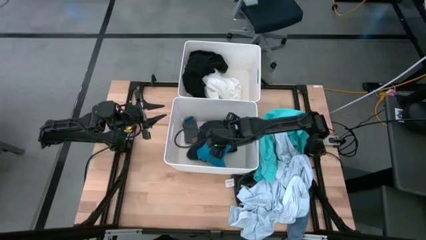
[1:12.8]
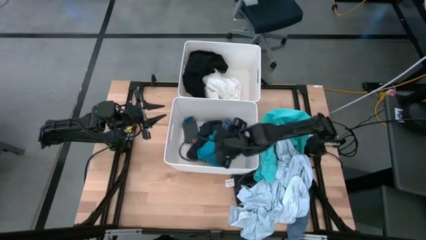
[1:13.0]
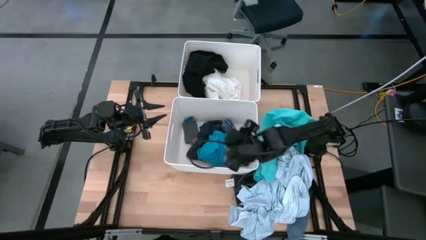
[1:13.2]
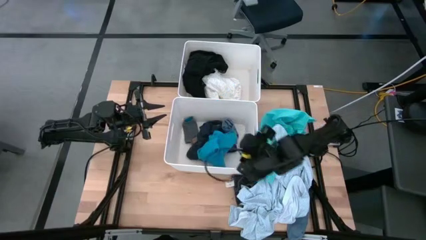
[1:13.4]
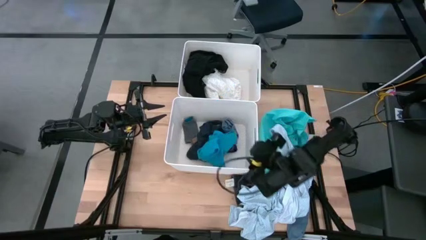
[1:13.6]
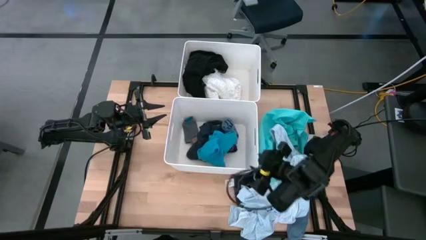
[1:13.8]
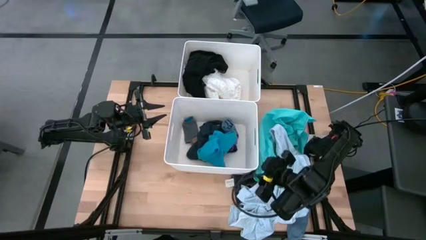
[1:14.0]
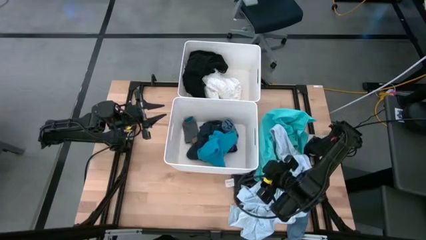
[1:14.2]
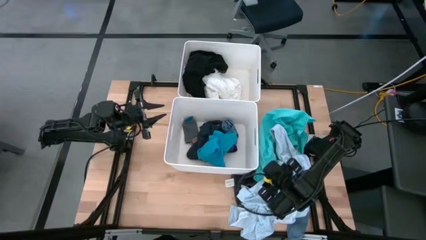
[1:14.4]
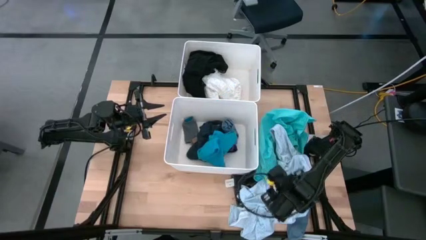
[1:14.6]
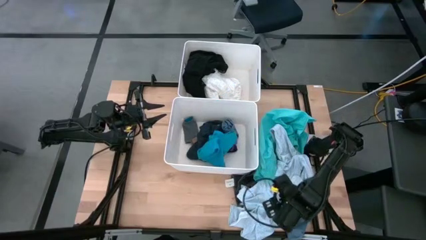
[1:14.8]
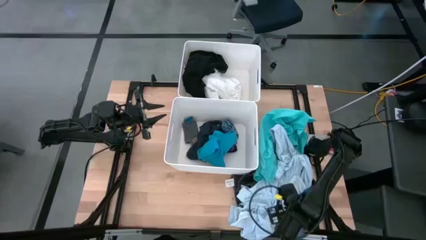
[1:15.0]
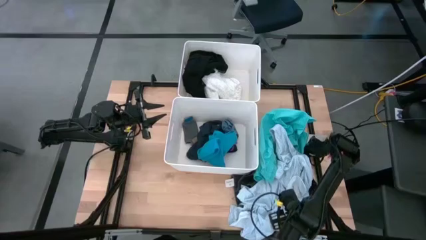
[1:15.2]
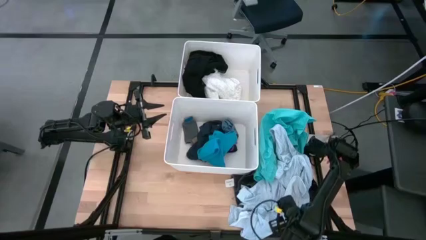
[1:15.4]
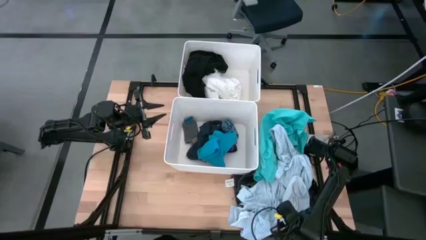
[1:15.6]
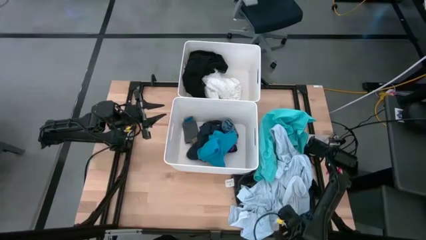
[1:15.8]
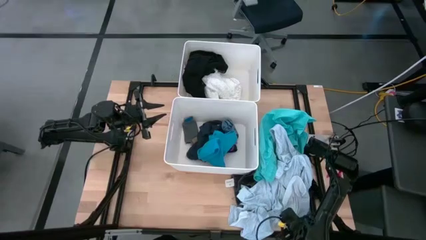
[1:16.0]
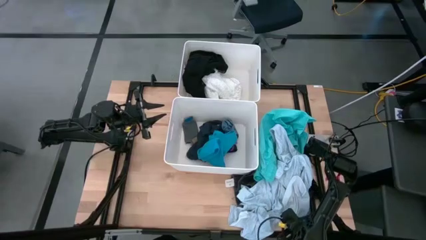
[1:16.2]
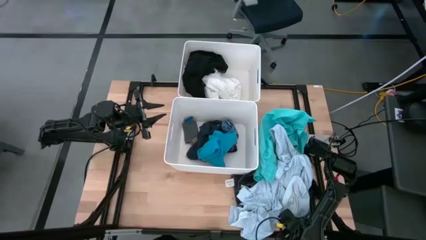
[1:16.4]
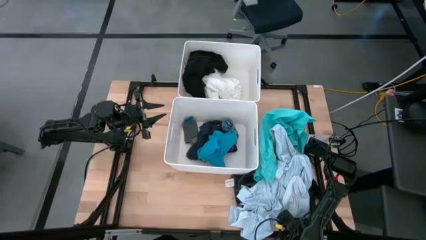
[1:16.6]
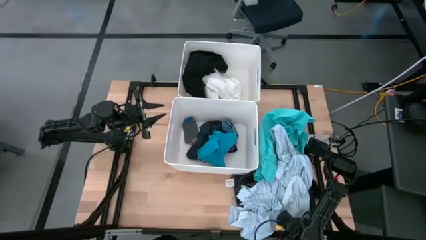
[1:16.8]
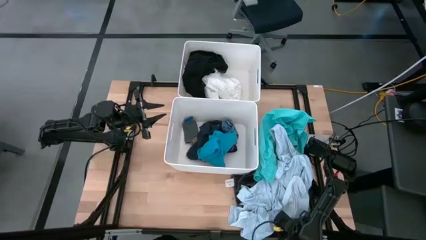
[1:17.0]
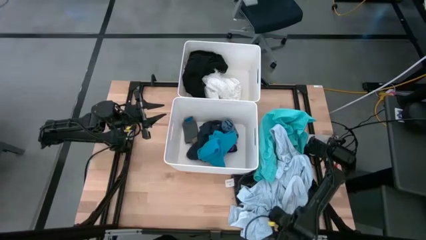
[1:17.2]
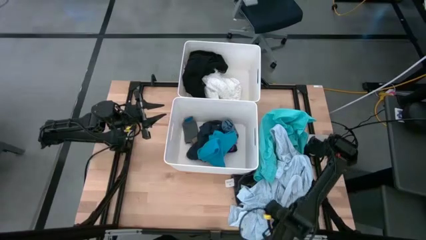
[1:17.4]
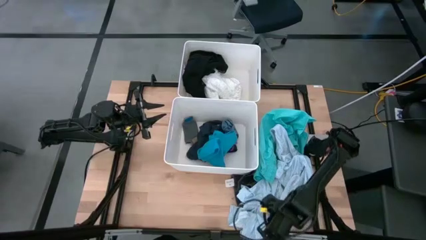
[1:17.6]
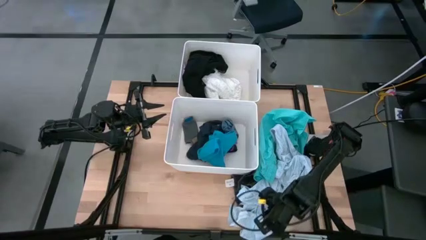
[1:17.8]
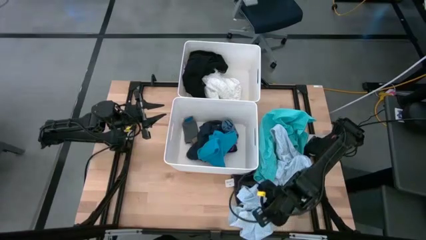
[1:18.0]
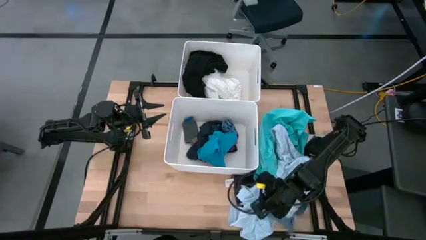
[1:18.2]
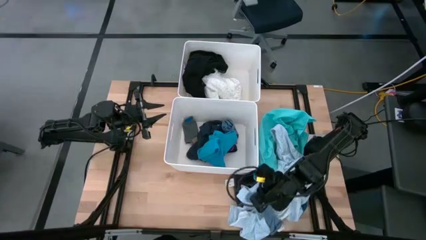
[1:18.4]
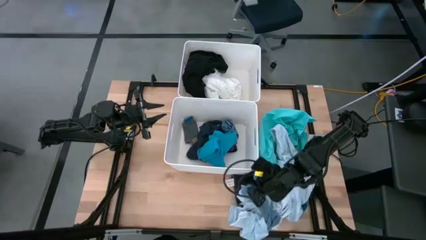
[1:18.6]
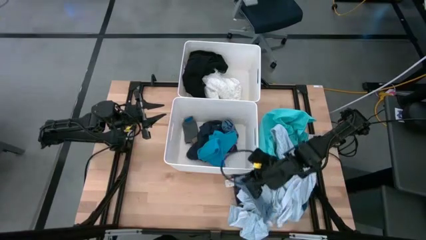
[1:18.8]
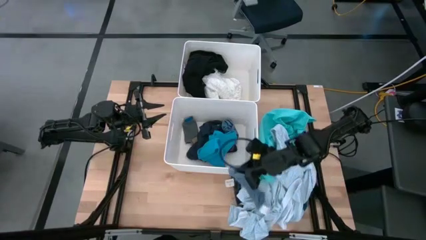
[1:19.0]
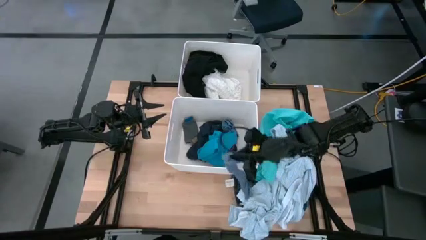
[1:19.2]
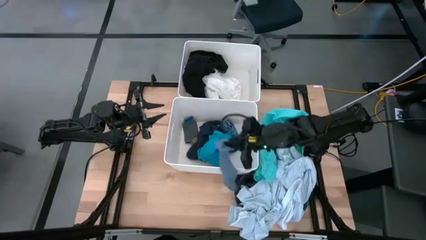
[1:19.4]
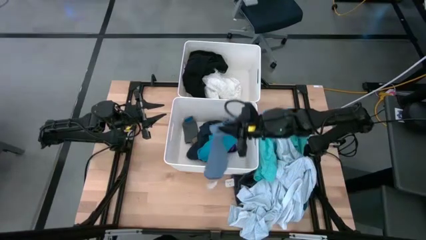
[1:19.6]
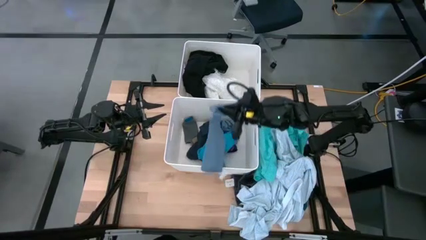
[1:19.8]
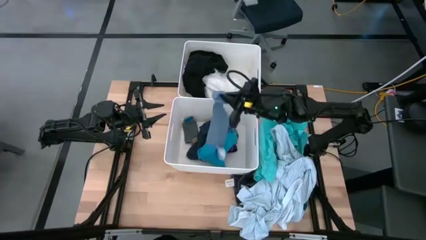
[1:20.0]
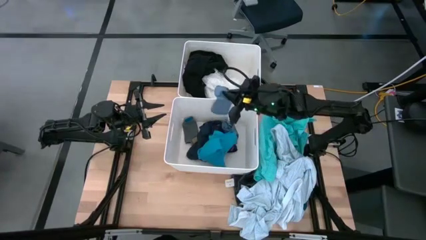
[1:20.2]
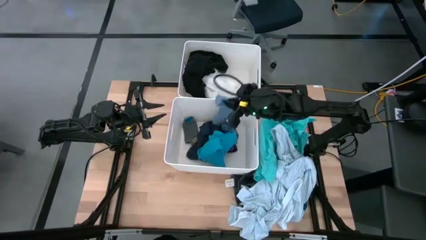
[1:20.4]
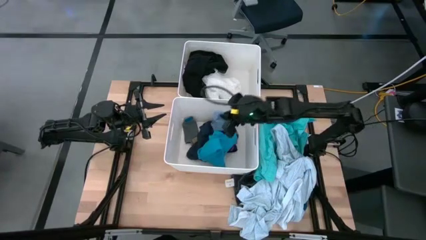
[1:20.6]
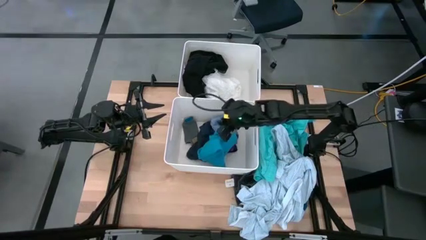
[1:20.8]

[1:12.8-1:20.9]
Task: Sort clothes
Put the blue sock into the bottom white bin

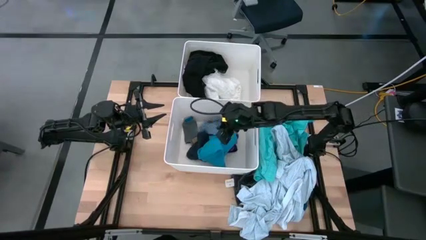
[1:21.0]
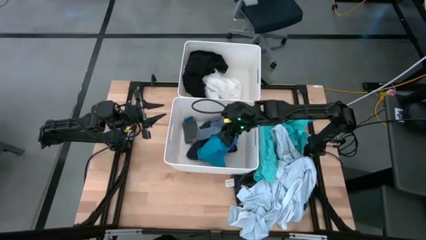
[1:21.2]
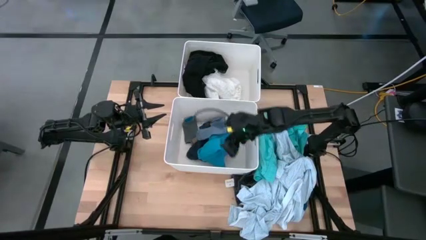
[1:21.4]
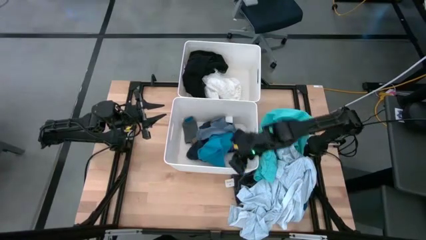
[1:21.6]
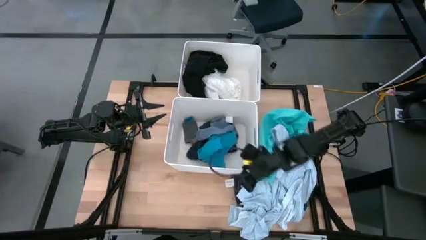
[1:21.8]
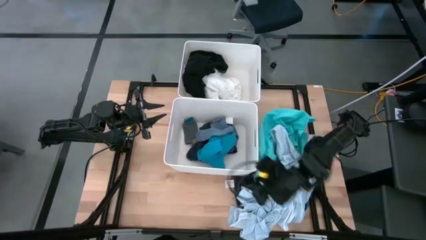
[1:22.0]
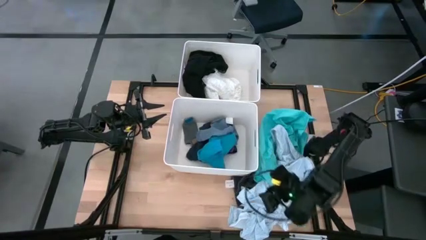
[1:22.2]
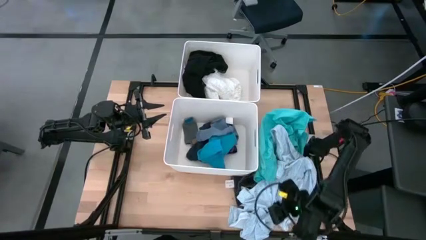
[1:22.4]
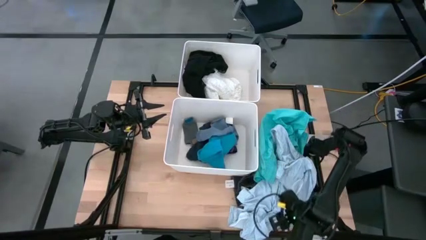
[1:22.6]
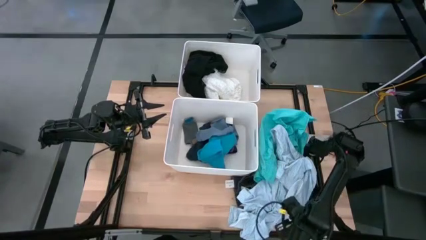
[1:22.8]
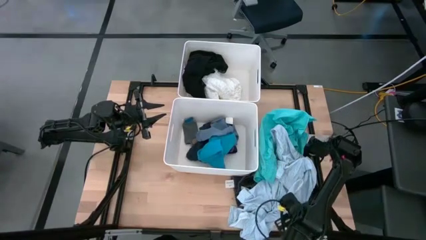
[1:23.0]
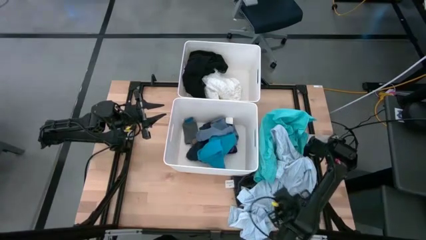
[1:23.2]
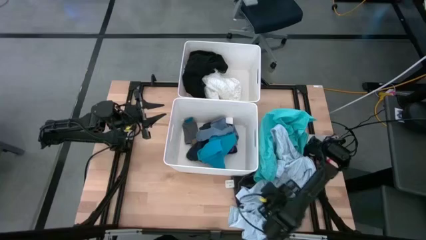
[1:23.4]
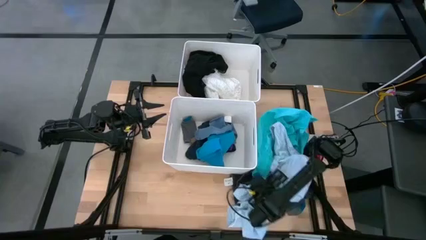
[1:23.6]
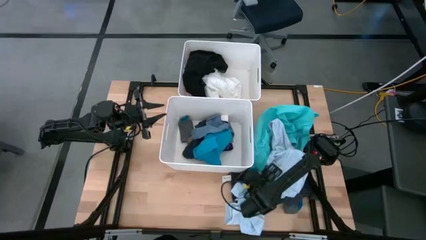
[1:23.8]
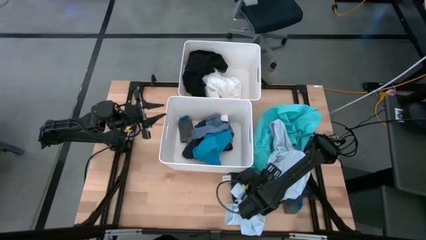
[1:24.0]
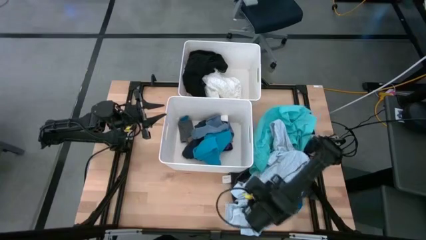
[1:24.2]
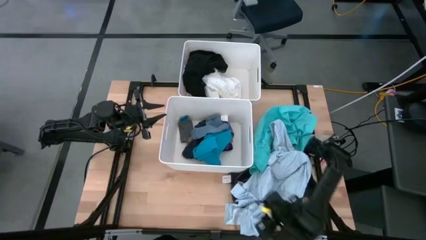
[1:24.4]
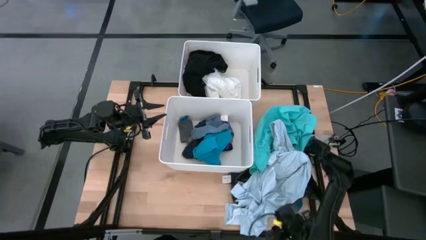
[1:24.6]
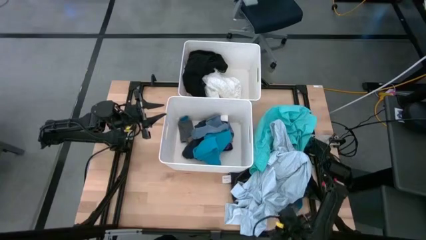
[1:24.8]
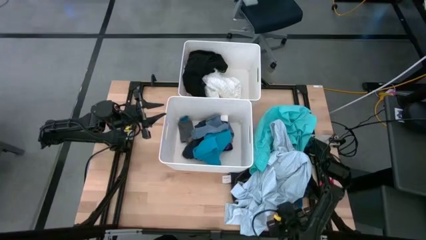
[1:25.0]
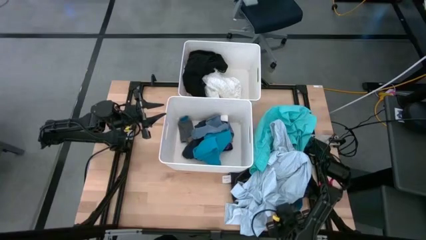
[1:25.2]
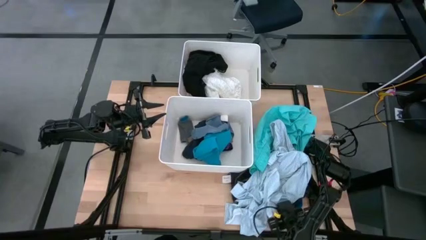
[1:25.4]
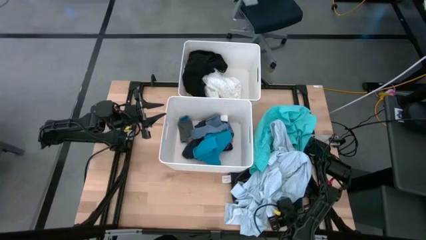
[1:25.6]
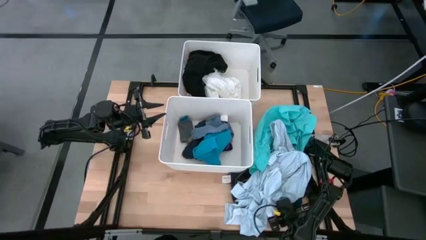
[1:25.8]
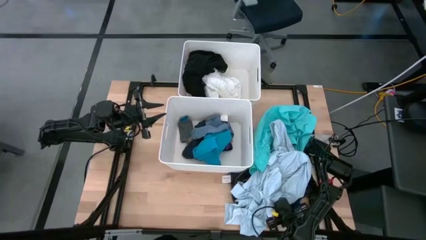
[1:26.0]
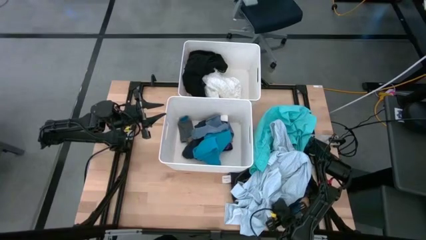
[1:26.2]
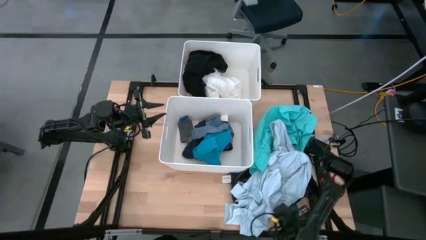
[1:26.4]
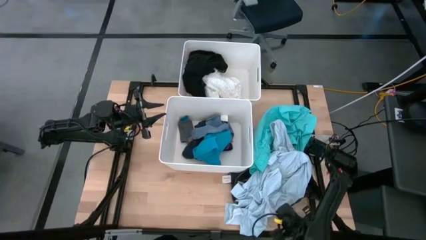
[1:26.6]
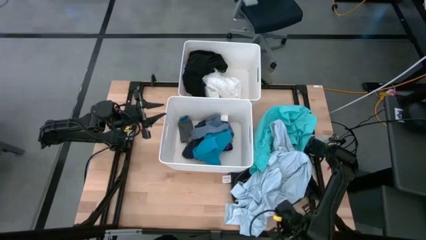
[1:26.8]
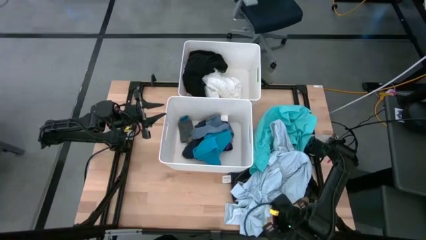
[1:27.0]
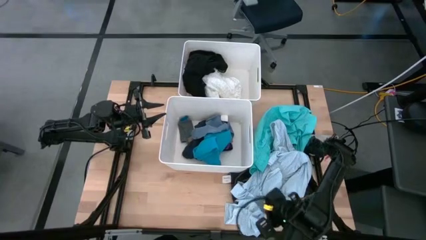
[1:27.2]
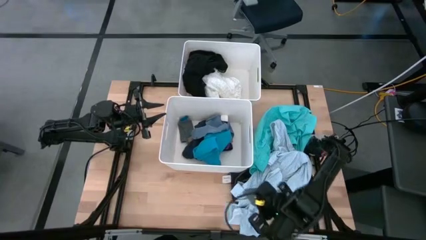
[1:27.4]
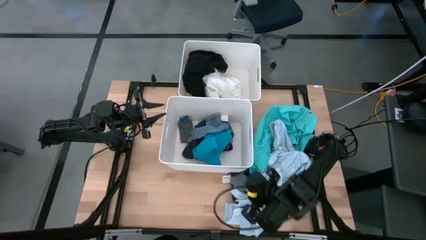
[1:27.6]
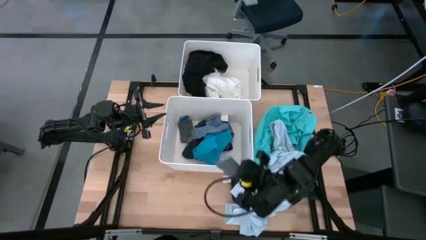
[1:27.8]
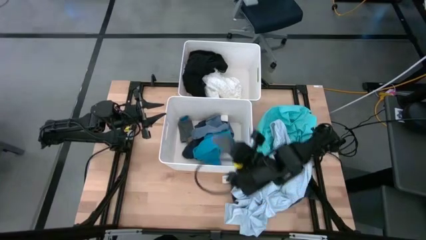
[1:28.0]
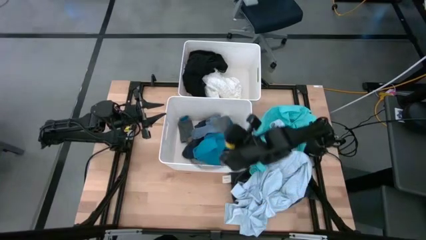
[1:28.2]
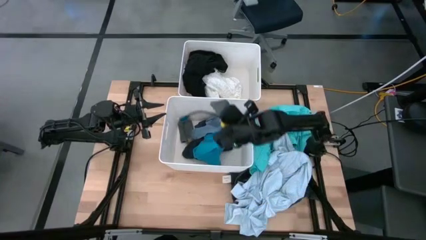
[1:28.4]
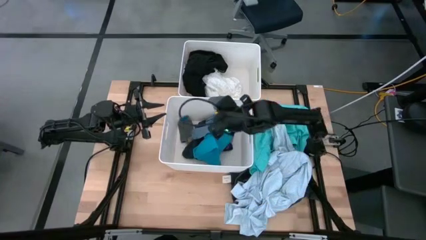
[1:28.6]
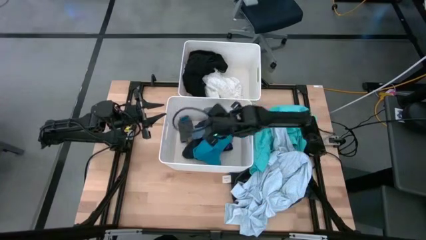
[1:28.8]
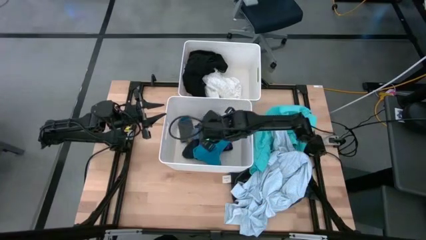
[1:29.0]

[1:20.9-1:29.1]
Put the gray sock into the bottom white bin
